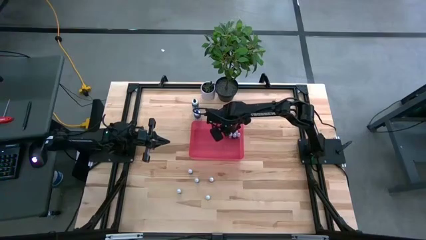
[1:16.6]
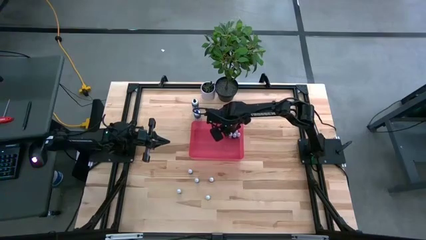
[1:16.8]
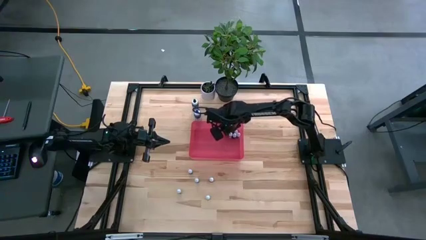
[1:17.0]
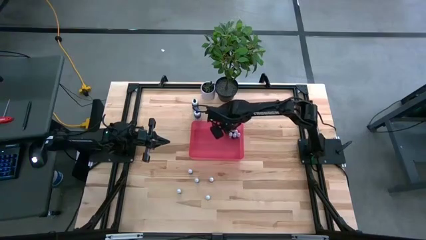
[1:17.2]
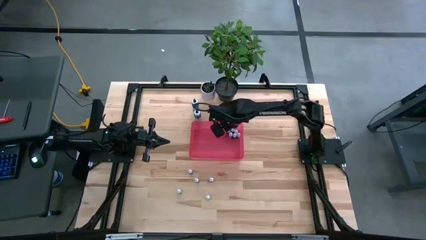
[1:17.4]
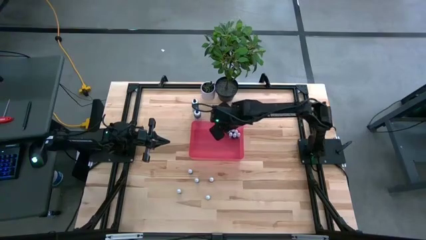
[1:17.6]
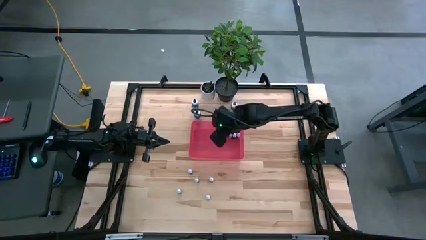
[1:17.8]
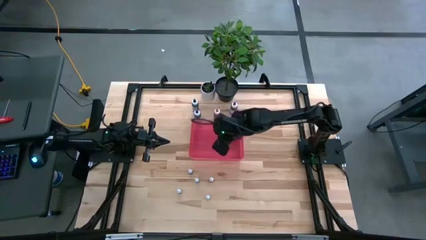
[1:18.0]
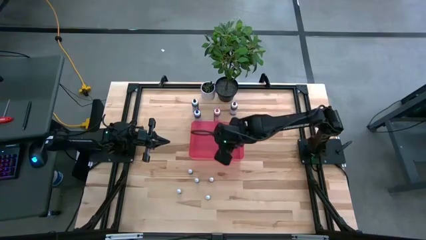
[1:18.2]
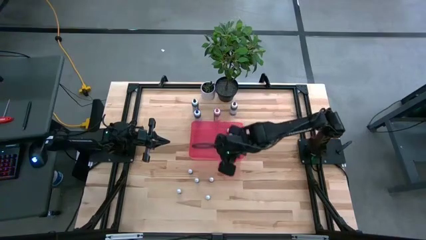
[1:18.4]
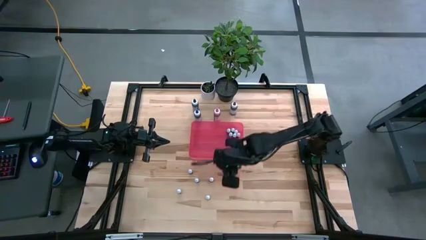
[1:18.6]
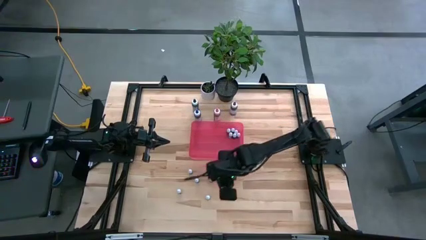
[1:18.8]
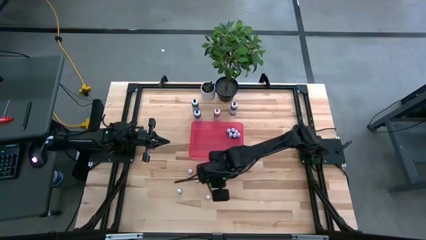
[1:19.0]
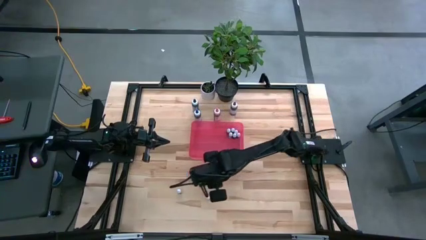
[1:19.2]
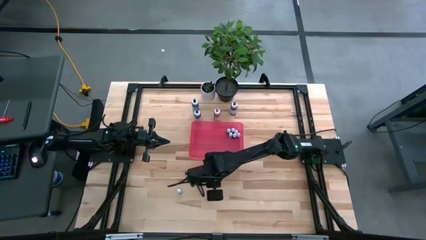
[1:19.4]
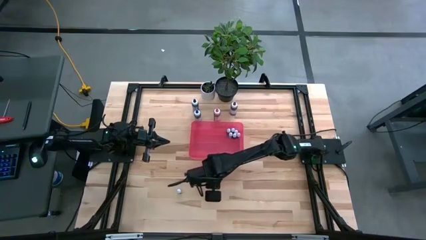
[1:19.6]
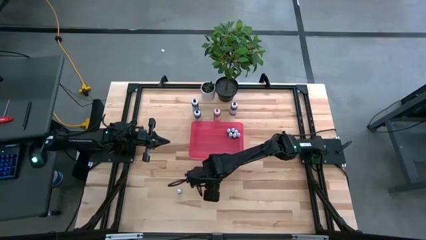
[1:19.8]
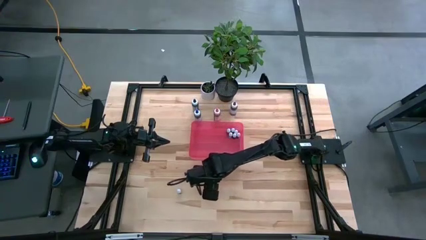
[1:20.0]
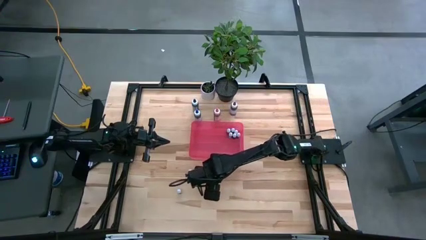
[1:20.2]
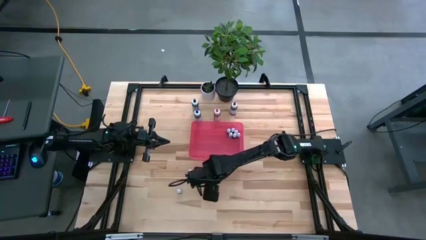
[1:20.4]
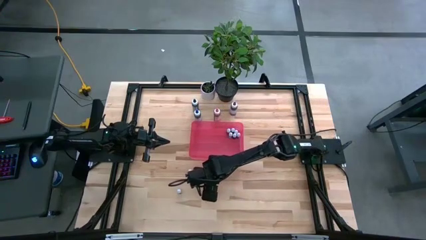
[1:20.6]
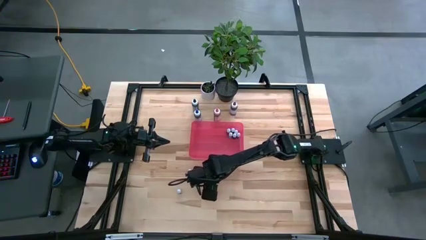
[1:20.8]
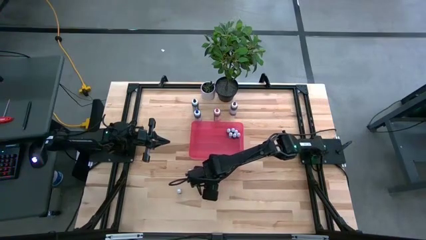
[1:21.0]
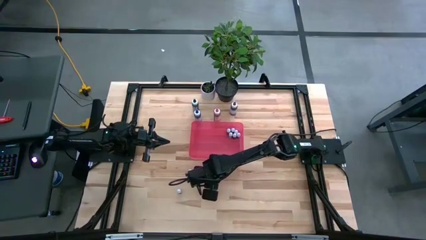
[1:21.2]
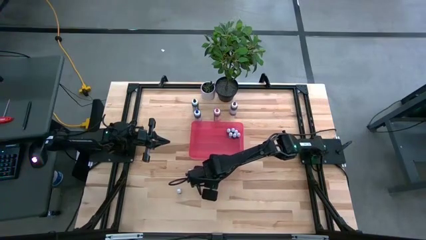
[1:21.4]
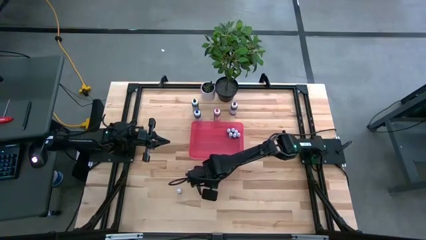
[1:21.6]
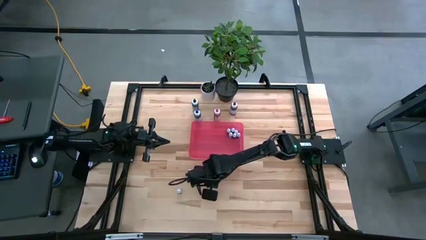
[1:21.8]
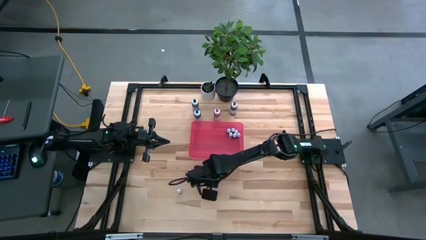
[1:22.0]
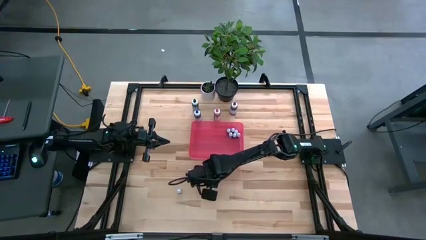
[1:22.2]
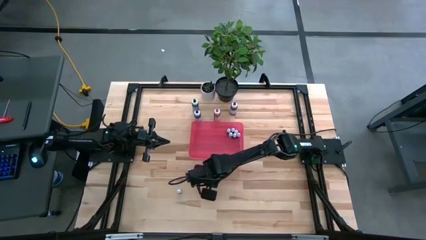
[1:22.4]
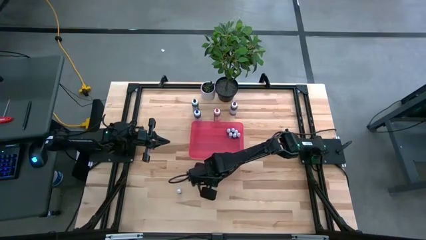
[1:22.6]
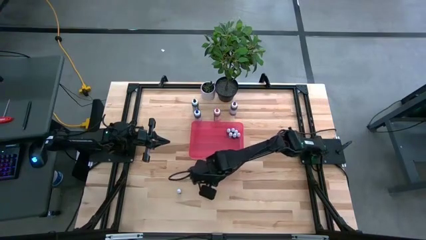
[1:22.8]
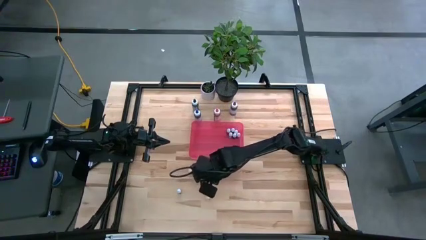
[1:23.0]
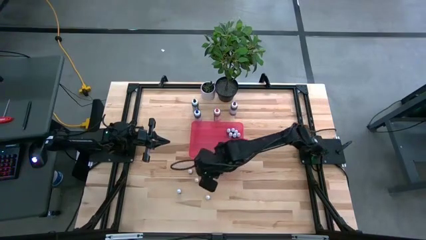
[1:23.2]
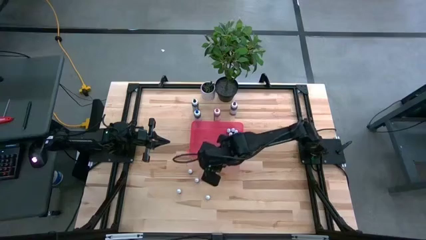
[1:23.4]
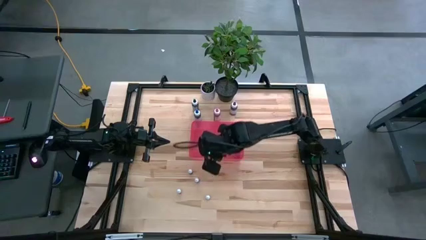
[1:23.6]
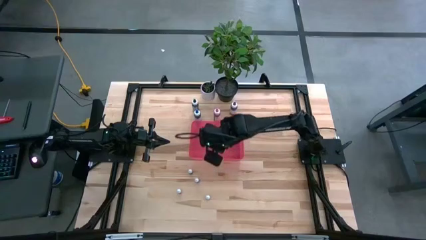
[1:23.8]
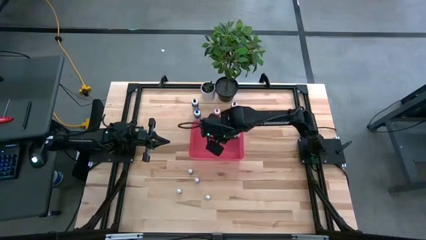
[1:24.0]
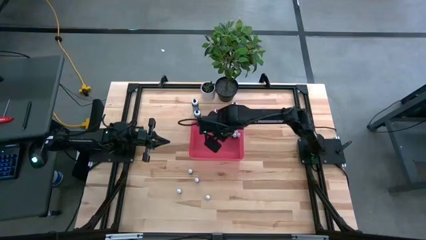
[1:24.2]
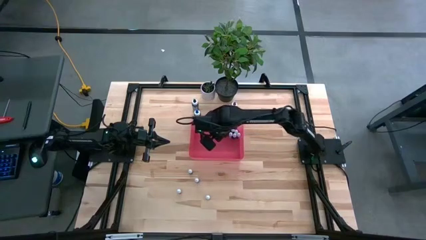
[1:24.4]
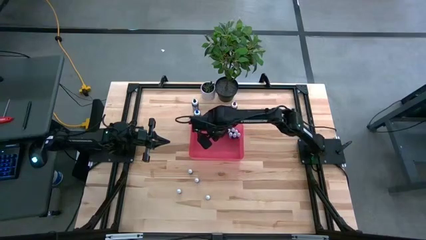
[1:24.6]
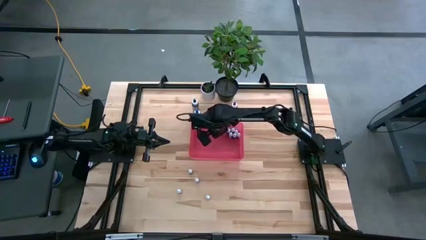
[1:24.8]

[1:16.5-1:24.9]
Task: Pick & Place food coloring
Put the small red food coloring bottle into the pink container

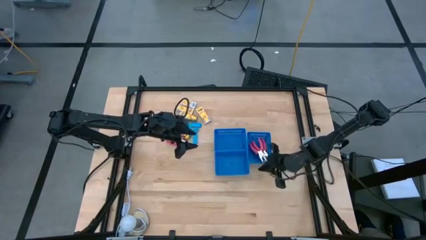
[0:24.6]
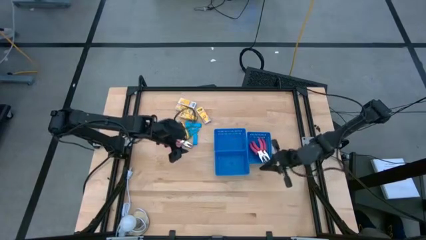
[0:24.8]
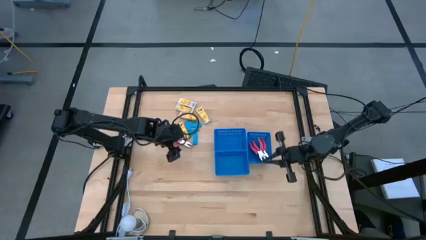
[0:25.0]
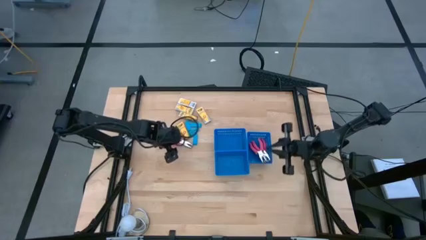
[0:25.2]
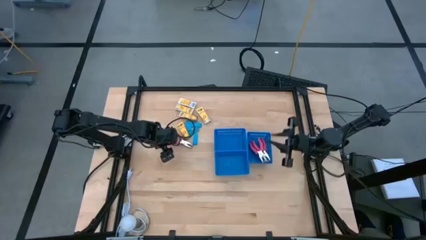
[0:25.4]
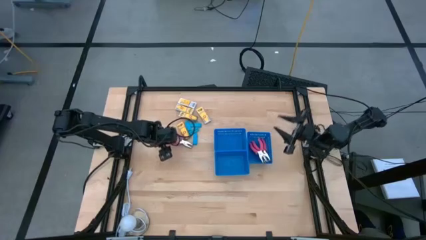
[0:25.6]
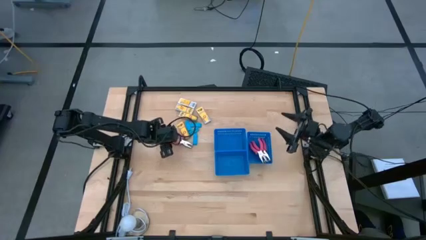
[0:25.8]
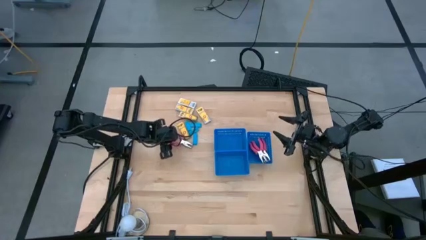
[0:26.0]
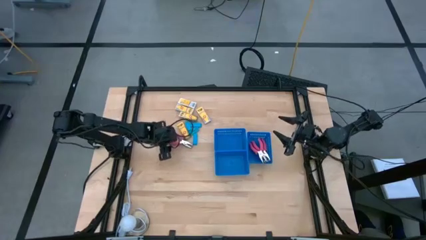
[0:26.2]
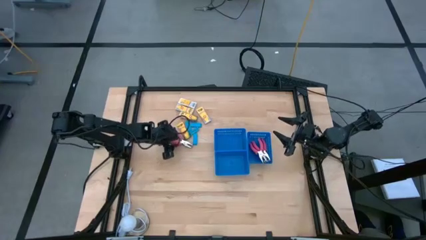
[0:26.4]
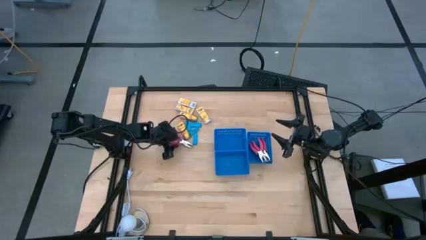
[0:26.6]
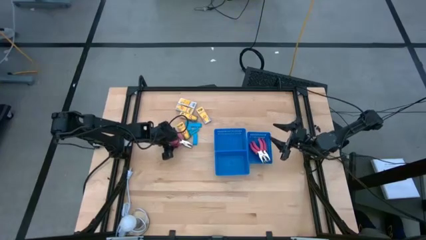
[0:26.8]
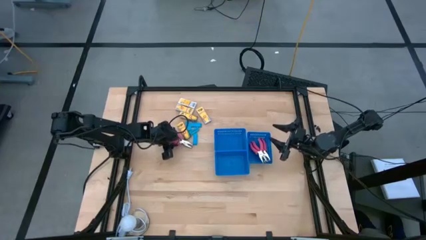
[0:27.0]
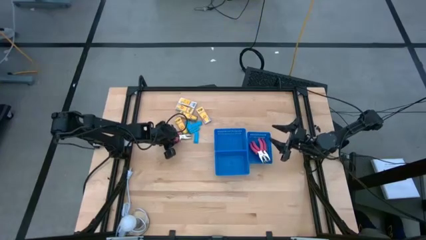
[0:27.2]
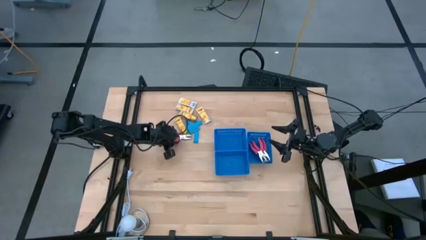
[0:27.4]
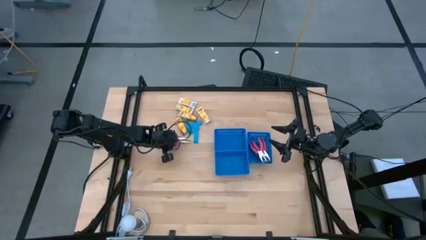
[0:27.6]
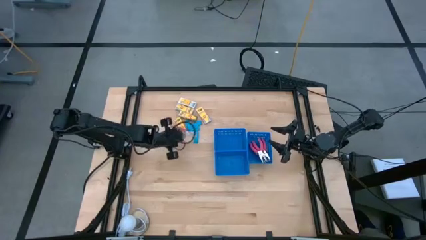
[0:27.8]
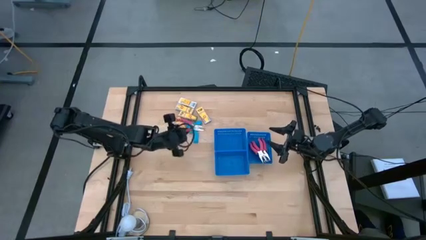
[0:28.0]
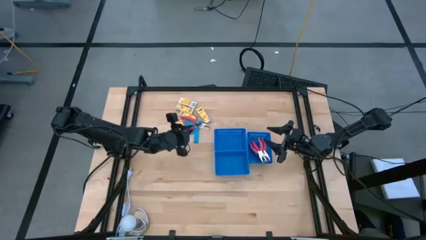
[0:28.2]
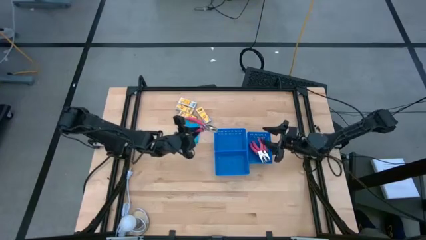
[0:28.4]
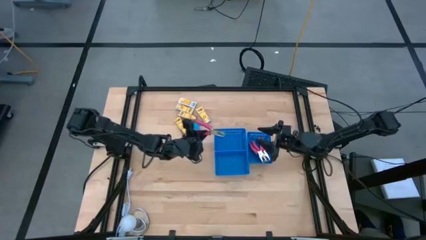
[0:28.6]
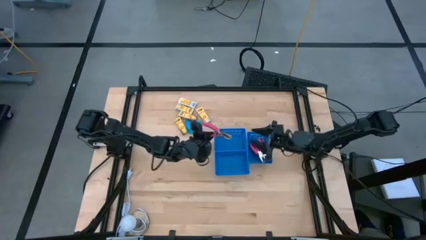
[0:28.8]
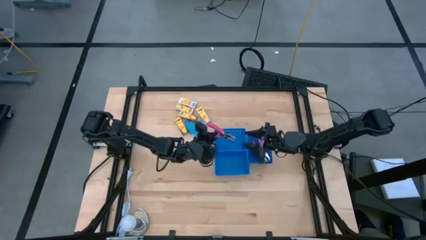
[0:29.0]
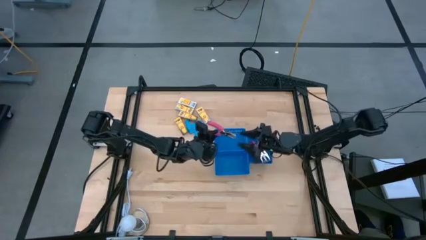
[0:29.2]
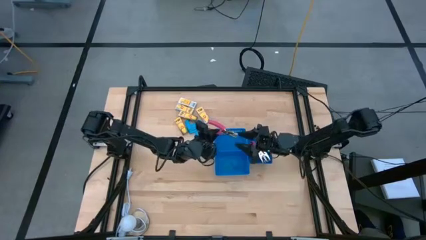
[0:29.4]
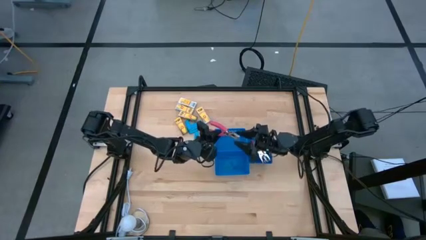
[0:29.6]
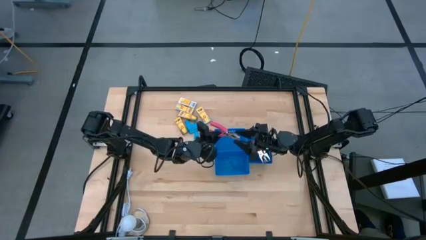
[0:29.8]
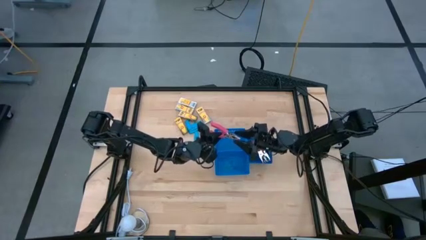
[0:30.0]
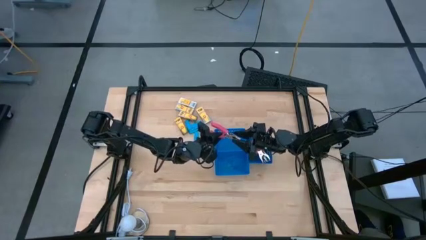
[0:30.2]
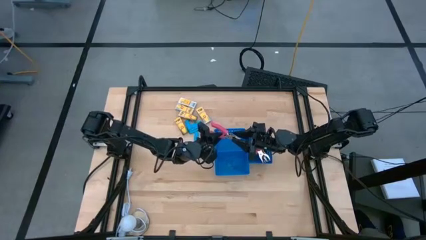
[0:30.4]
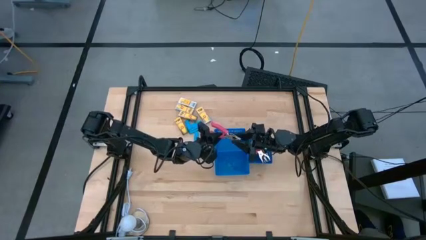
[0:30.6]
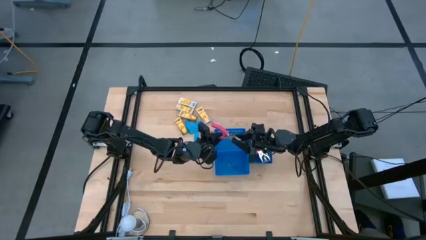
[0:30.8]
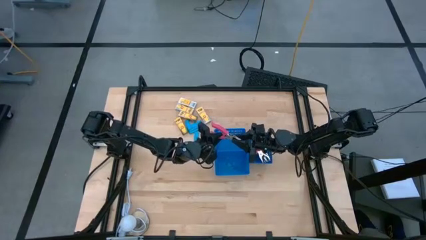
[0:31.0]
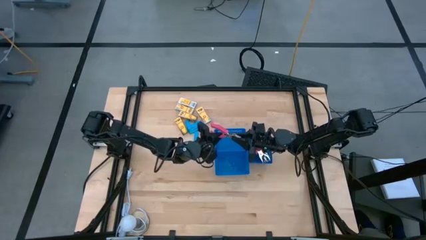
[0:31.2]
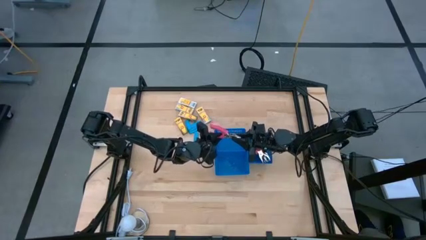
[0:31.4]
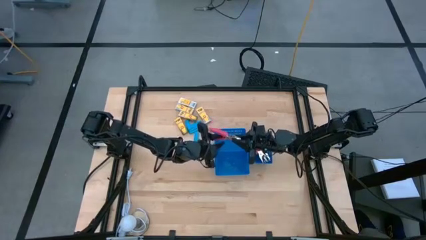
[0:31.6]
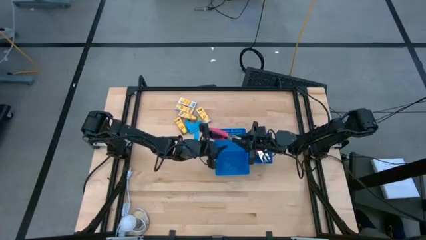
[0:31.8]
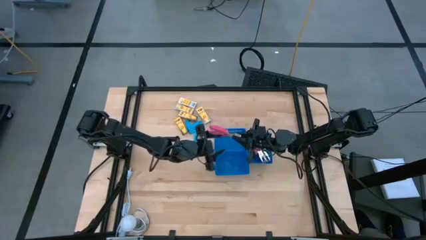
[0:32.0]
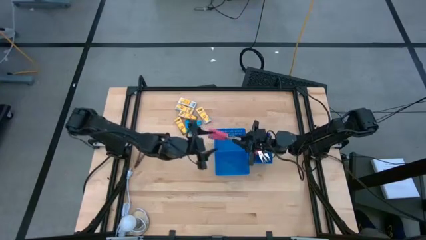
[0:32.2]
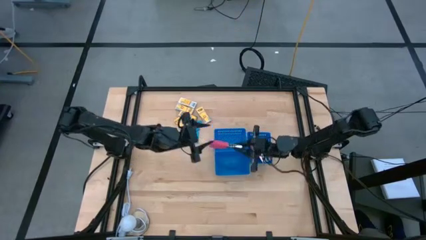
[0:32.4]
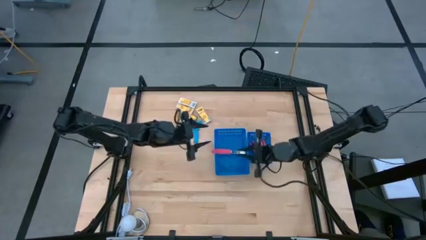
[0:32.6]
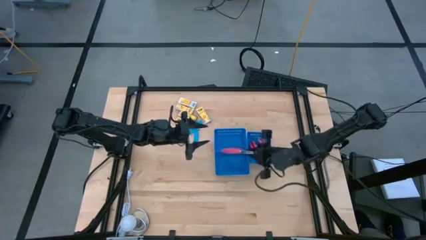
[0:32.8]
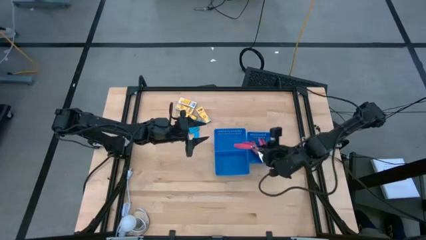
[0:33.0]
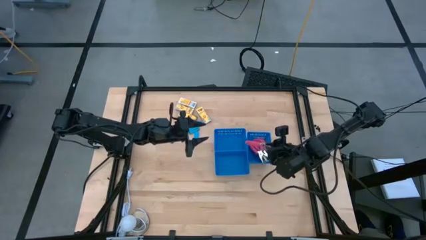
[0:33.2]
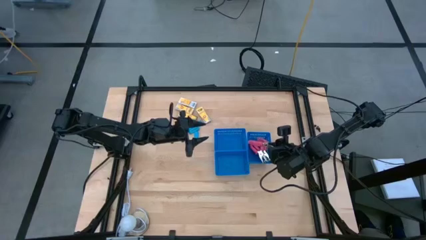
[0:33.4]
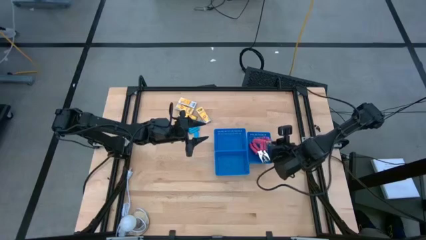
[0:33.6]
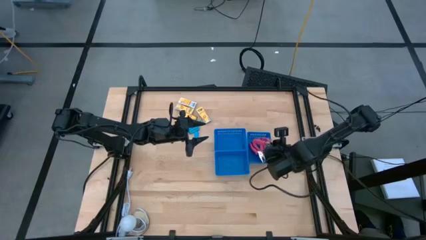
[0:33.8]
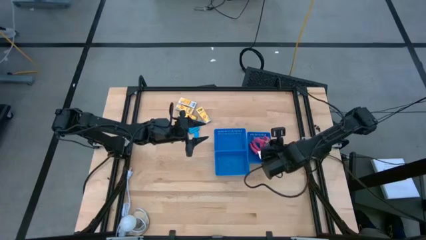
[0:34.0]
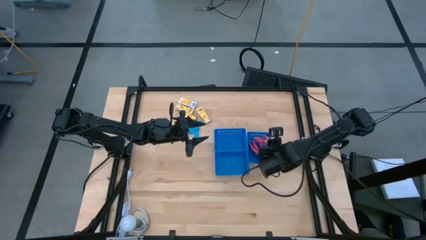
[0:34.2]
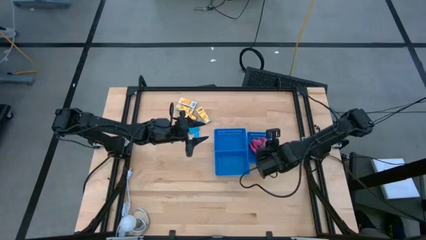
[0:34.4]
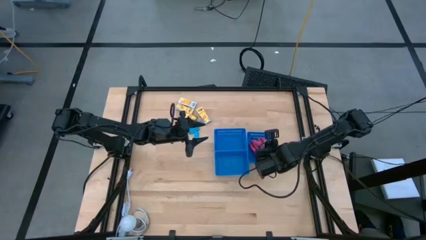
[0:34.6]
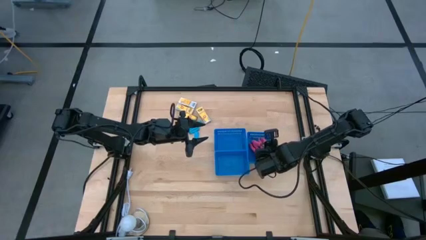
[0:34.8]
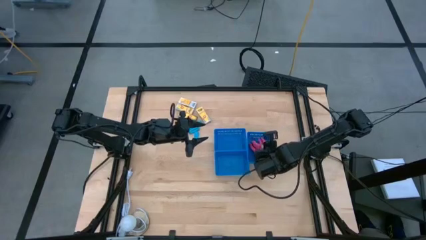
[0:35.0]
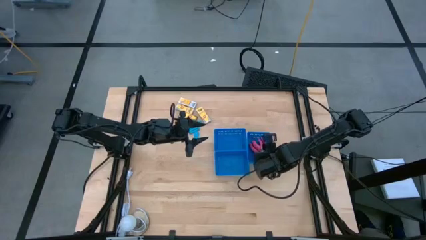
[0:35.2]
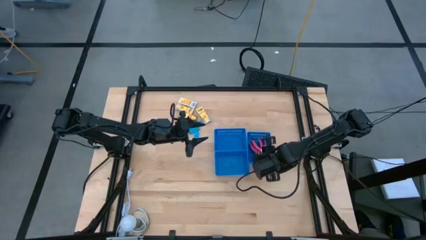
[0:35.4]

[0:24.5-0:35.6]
Task: Pick & Place School Supplies
Put the pink hole puncher into the right vertical blue bin
